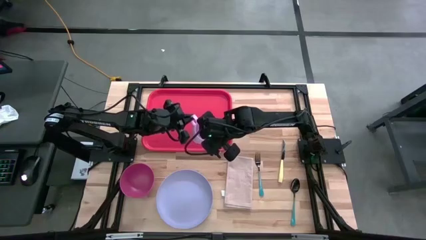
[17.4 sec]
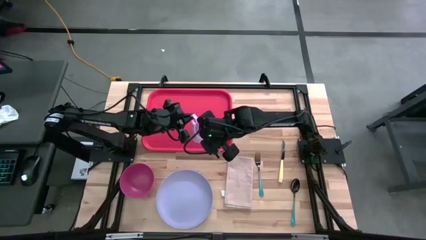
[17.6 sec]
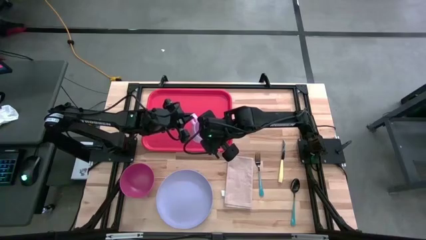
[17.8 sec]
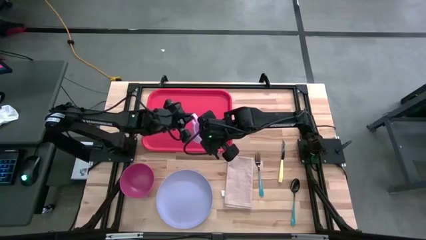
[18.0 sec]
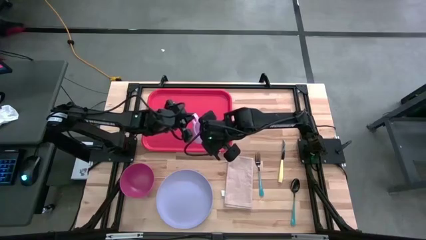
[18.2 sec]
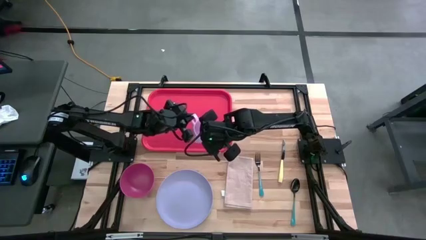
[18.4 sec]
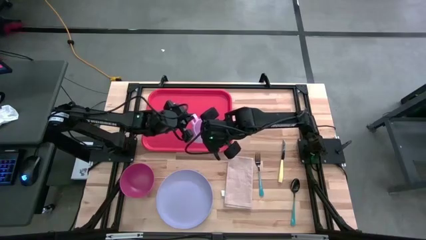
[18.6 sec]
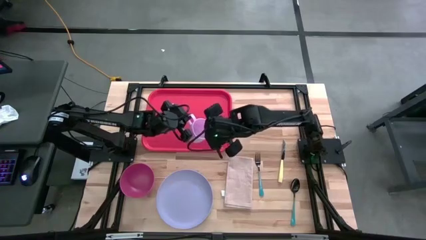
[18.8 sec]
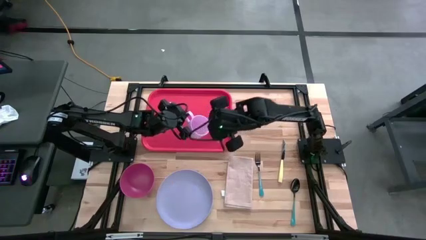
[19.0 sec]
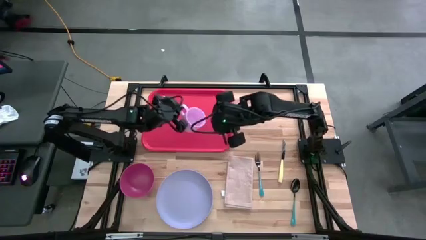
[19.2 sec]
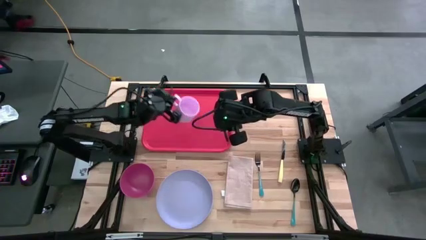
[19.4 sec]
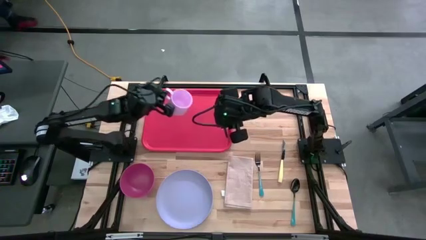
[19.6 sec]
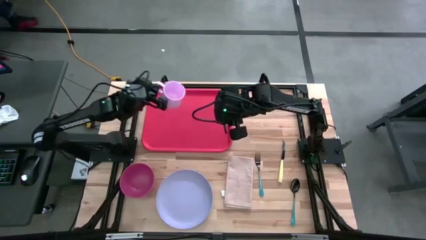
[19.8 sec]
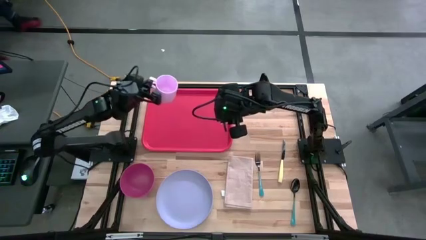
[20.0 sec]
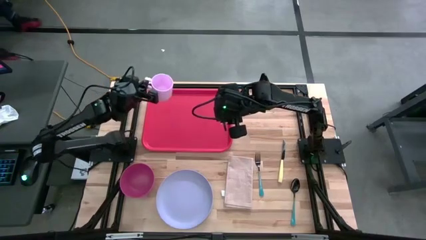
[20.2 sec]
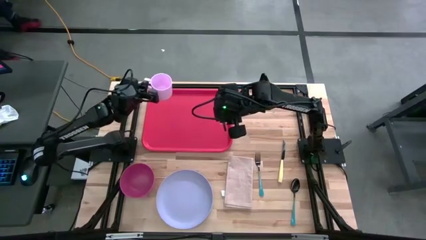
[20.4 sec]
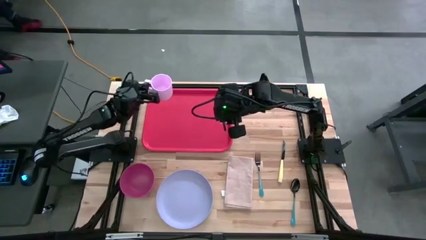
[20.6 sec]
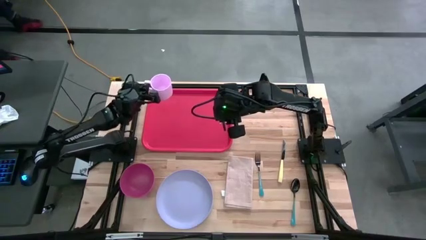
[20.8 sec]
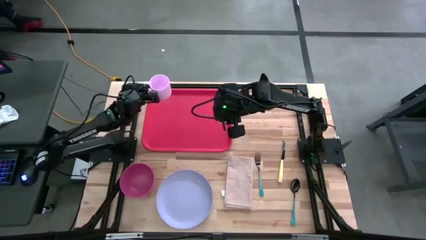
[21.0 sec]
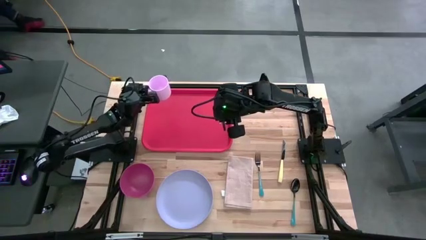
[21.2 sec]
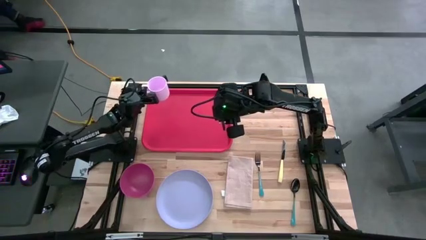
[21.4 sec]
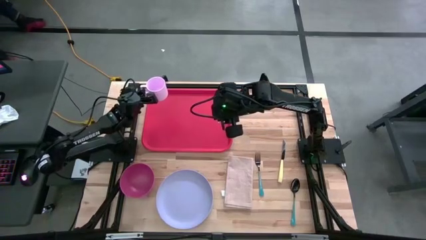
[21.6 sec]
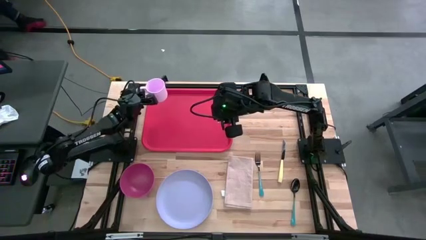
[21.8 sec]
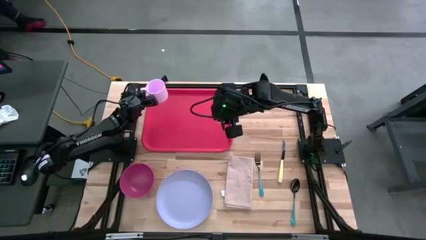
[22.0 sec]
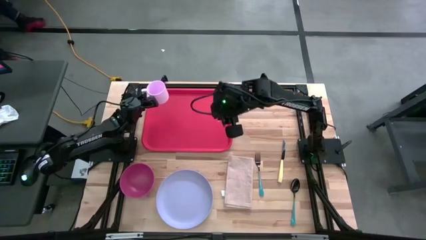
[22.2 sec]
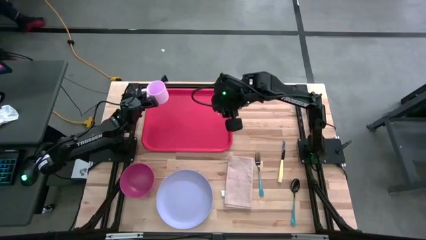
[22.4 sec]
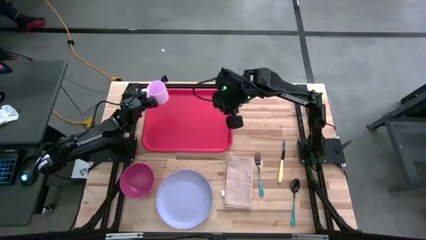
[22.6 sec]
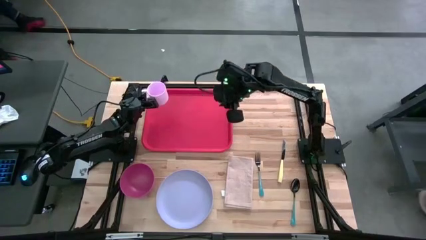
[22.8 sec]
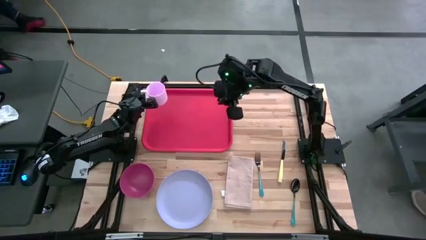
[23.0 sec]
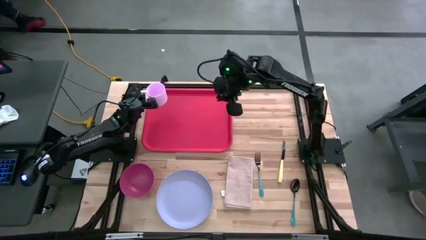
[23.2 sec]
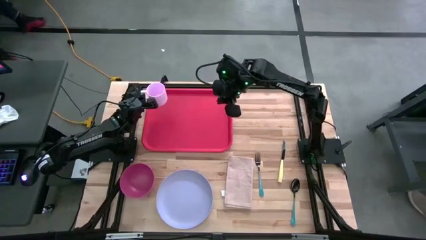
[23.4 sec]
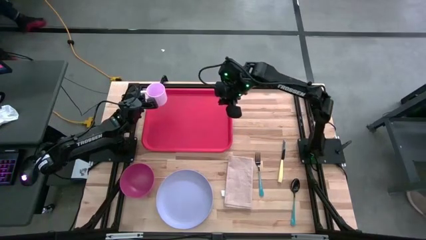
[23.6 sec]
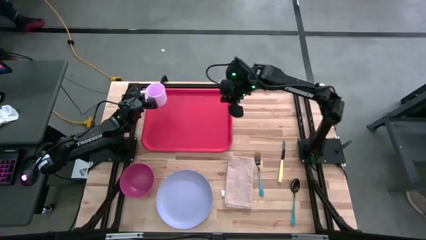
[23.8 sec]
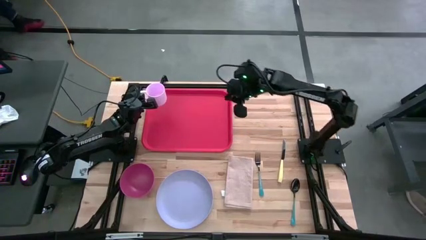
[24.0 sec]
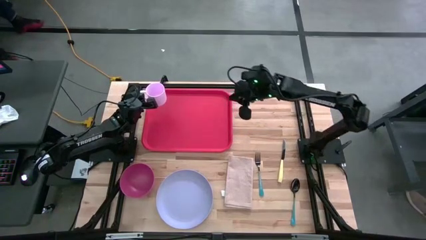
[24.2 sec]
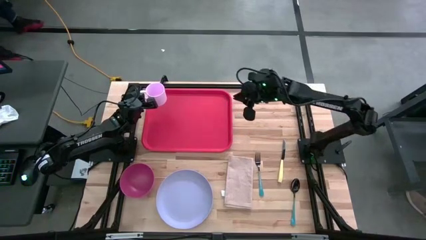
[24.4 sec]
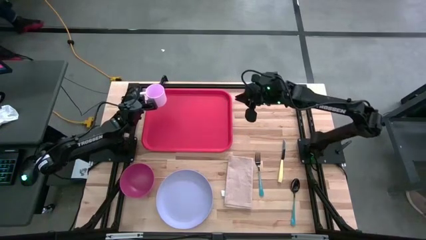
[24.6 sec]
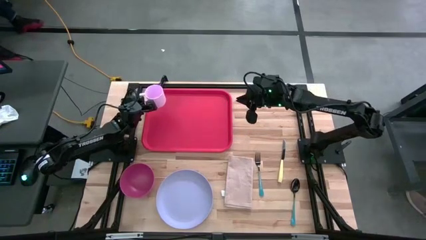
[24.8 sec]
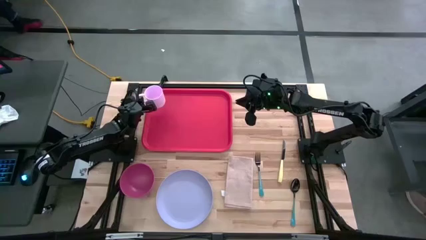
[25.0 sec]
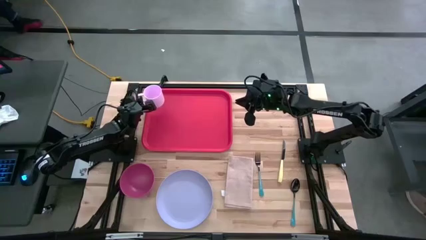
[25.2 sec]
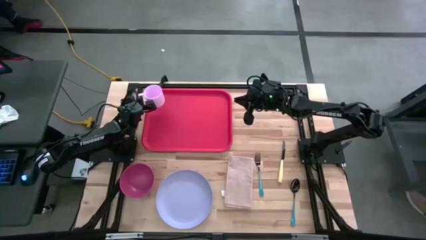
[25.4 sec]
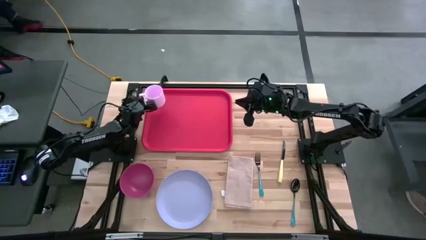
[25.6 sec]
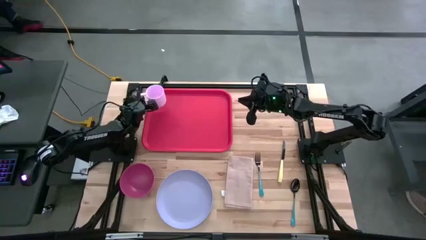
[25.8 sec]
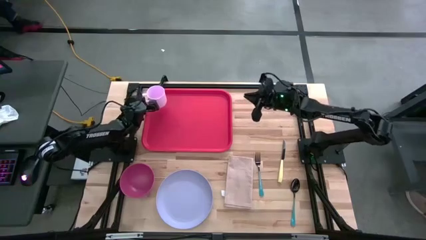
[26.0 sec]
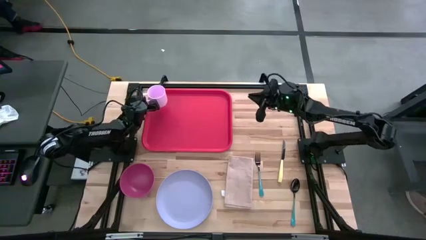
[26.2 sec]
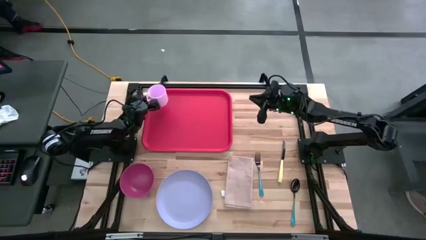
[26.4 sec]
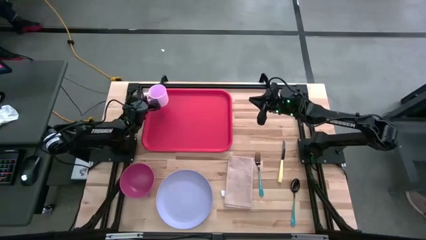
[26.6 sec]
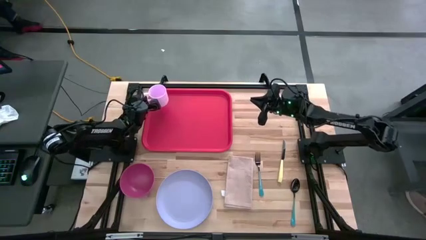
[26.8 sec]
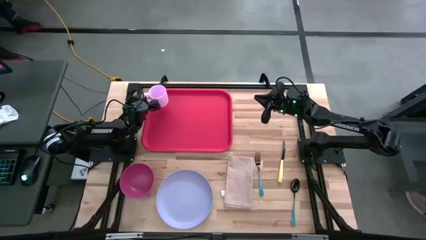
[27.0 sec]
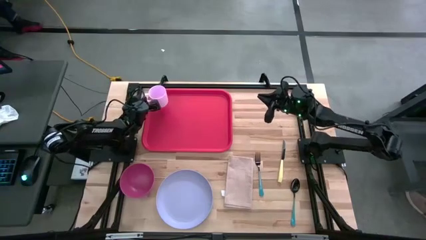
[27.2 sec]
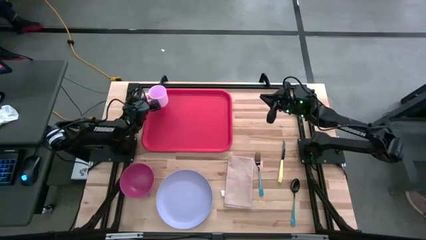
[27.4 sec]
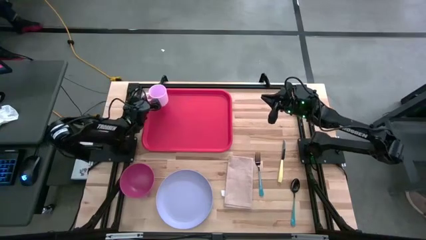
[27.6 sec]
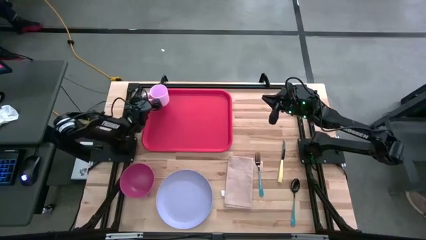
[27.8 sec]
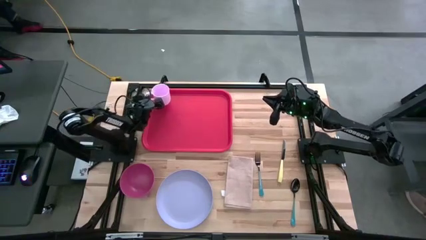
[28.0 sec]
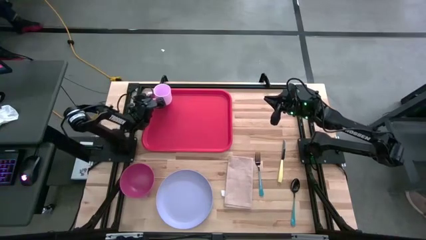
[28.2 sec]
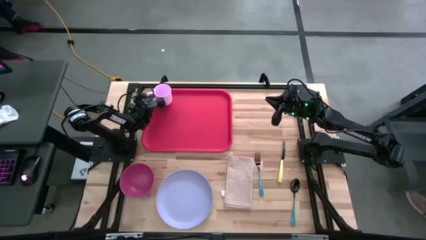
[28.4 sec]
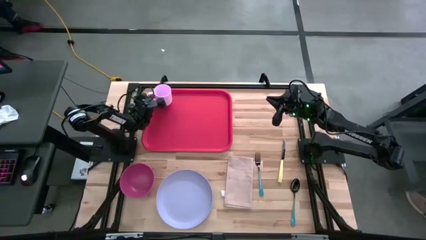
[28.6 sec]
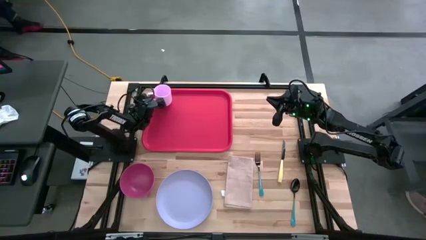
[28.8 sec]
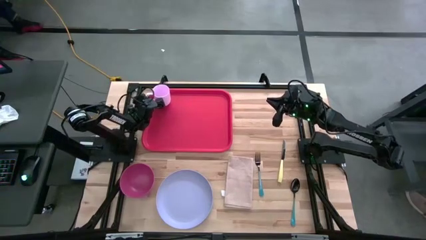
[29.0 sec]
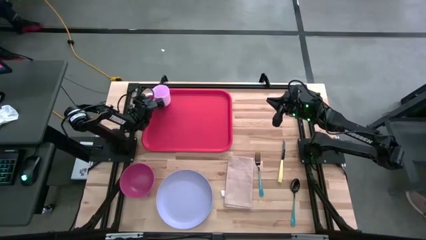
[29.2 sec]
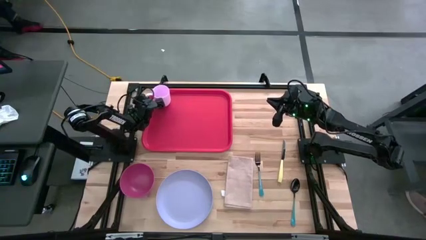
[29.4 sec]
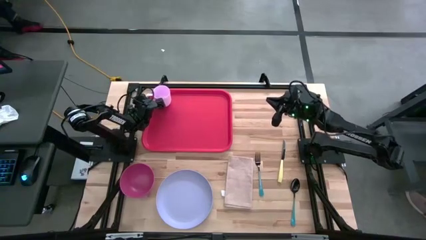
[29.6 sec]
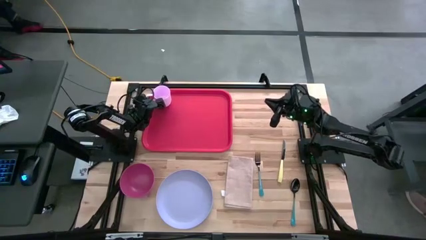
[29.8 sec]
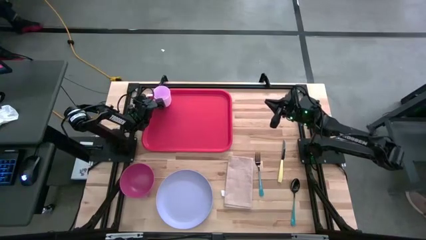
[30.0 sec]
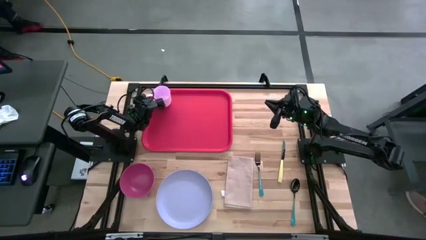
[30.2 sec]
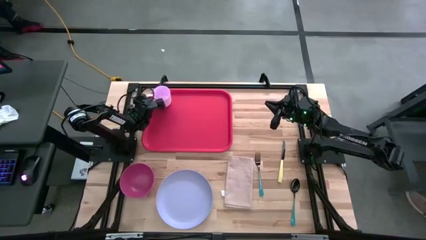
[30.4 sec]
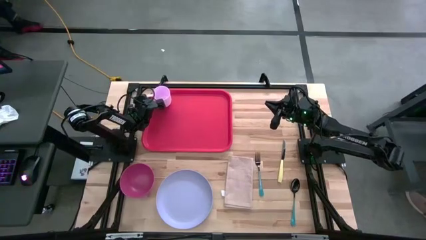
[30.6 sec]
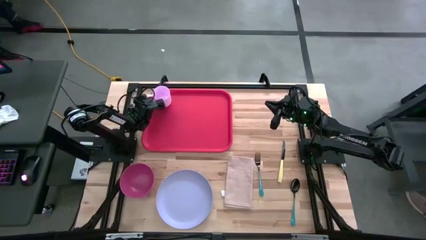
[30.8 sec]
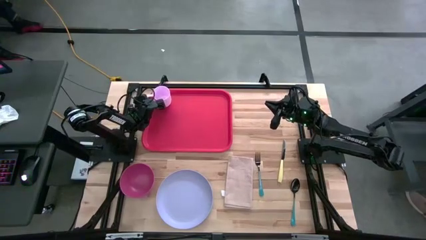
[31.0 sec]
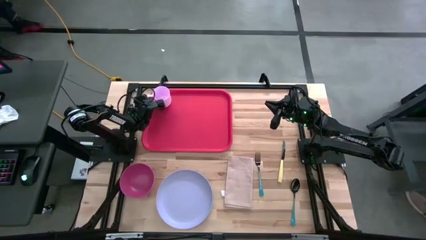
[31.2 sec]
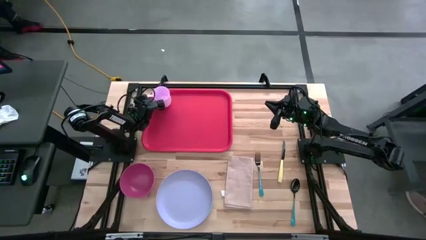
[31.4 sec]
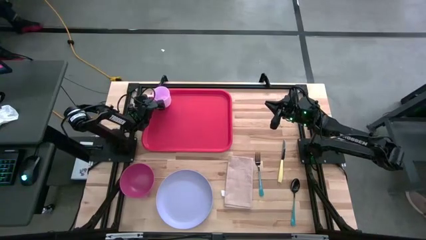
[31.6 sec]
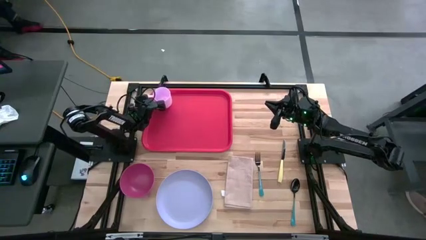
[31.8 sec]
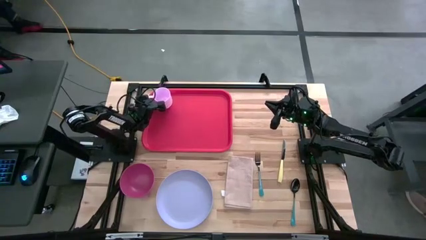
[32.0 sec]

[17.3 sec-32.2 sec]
Task: Set up tray
Put the pink mug on the red tray

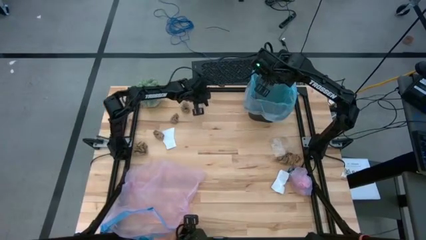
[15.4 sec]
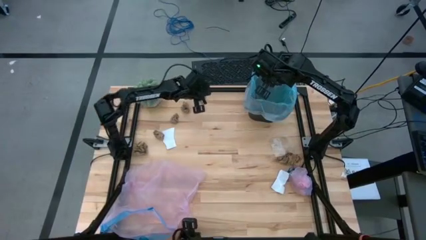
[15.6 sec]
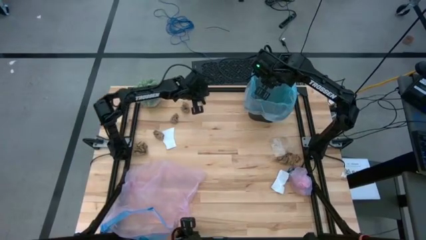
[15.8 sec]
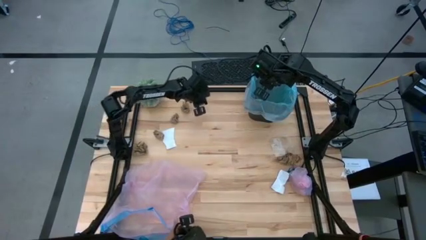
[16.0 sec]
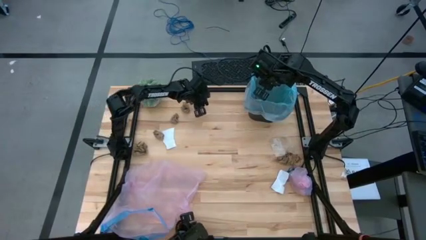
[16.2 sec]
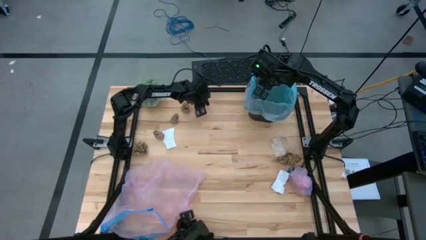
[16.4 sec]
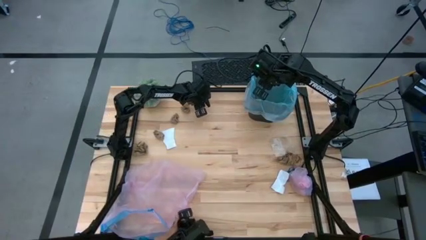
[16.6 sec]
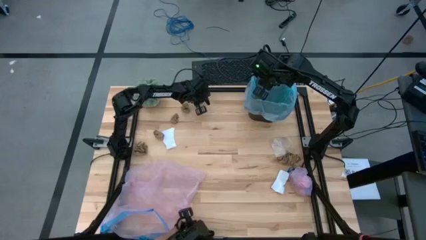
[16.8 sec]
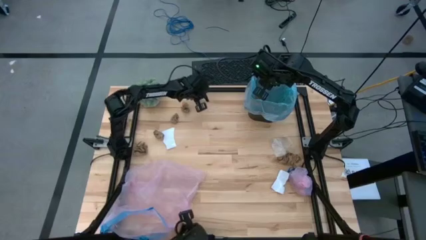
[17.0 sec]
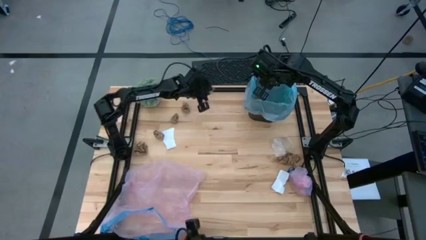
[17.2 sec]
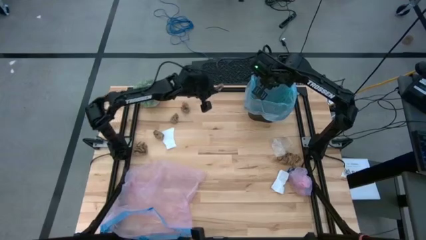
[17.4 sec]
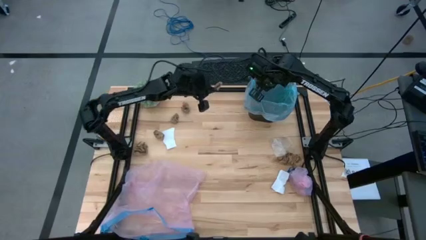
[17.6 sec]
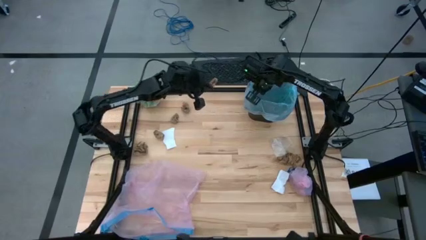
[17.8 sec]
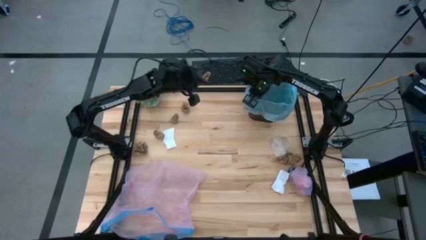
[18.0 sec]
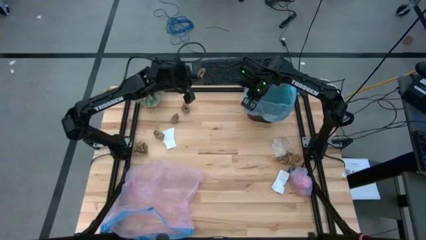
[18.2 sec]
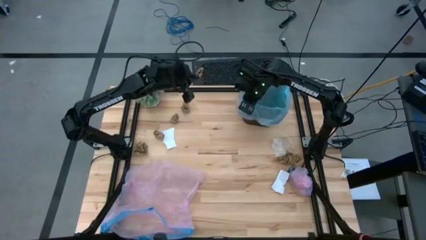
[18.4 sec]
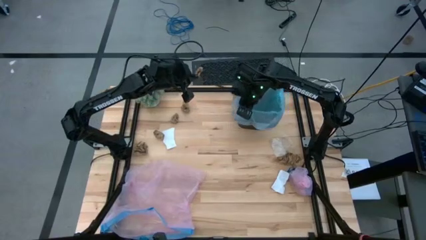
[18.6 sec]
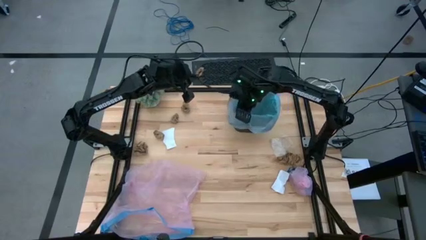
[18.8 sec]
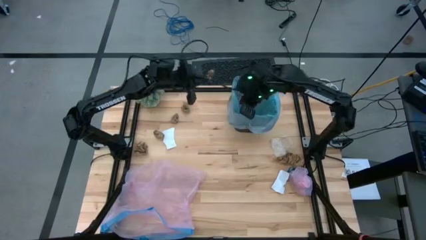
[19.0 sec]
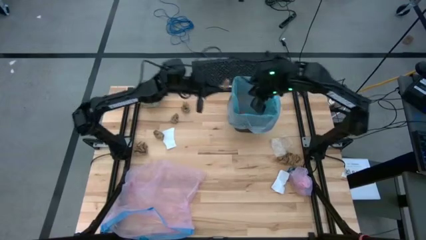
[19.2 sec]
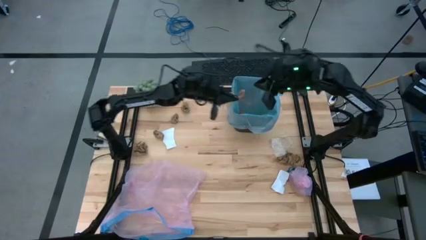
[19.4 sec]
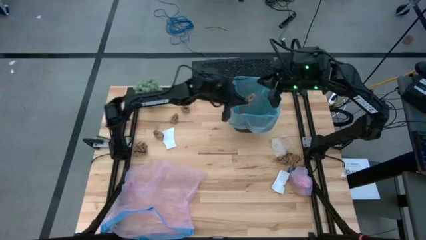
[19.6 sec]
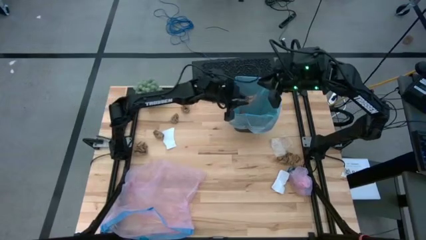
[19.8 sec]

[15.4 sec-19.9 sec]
Task: place trash/remove bag and relplace
Put the brown napkin into the trash bin
